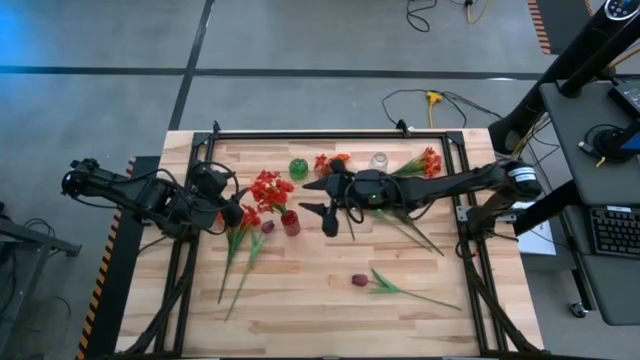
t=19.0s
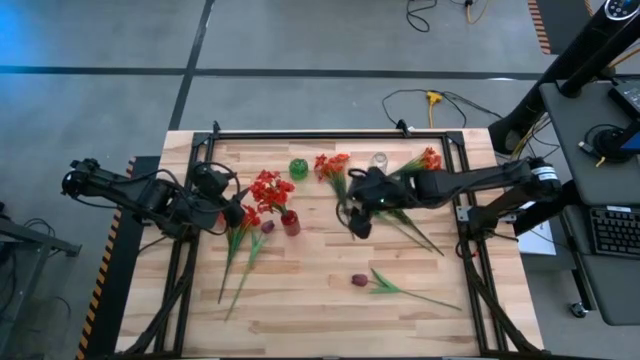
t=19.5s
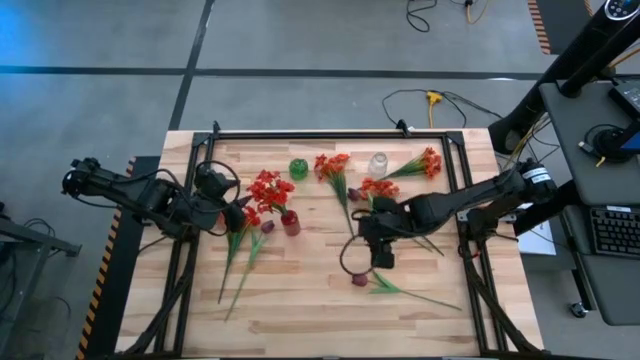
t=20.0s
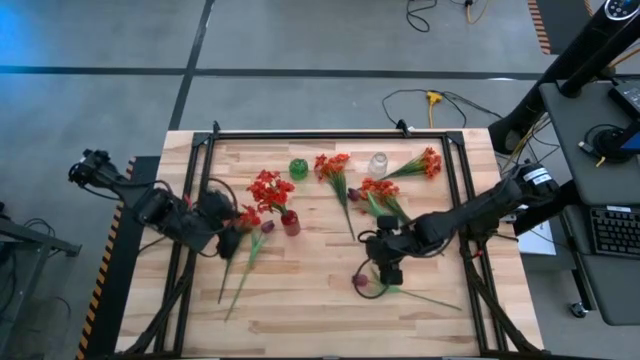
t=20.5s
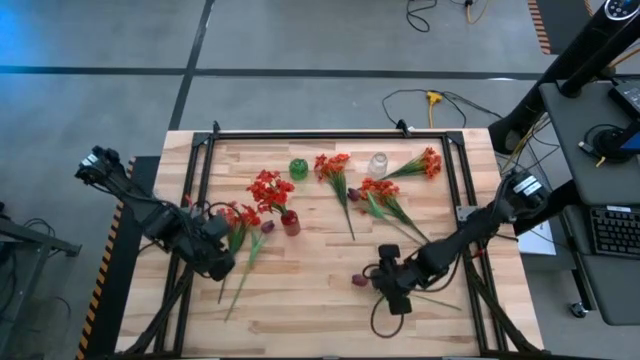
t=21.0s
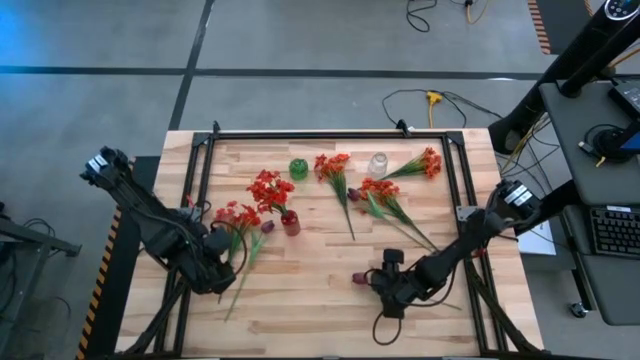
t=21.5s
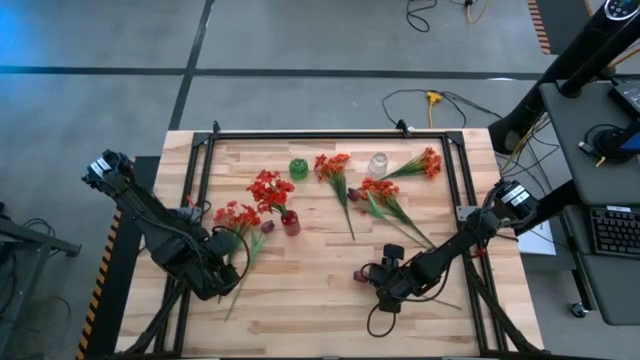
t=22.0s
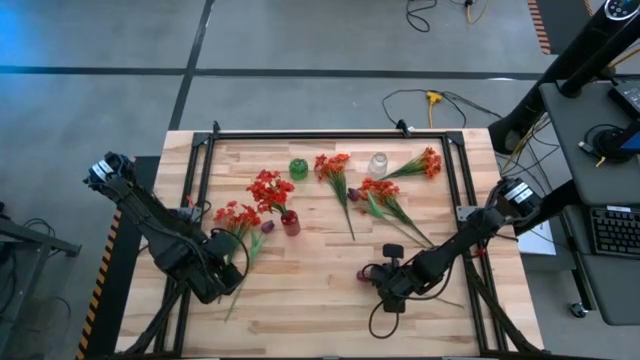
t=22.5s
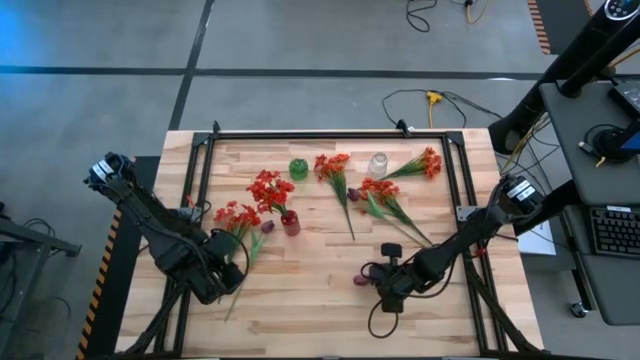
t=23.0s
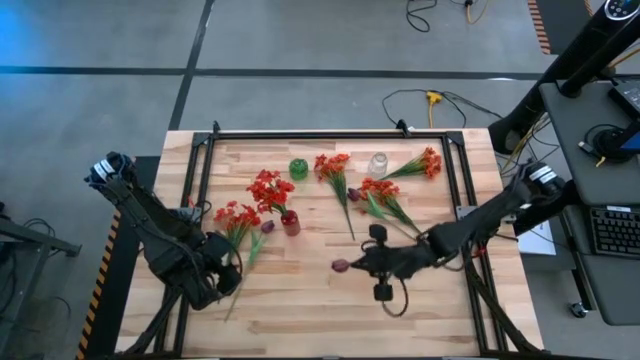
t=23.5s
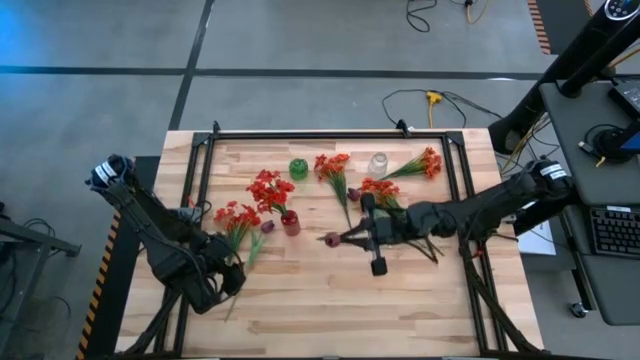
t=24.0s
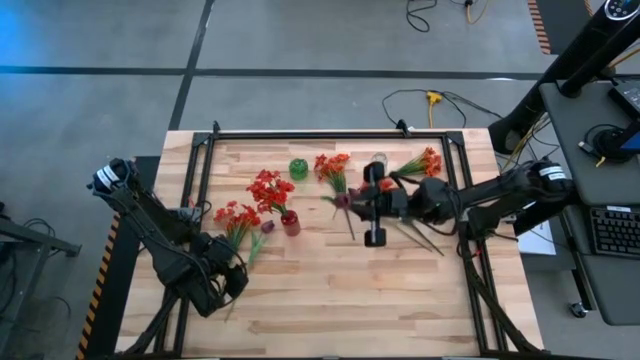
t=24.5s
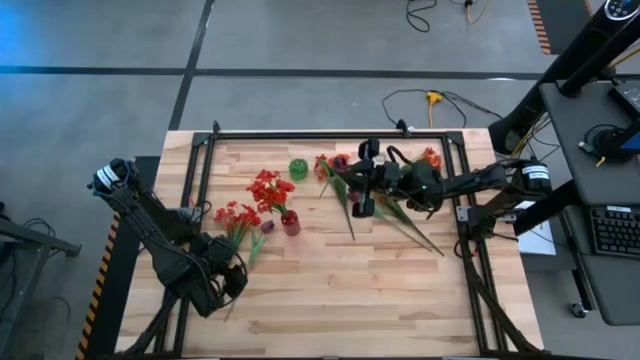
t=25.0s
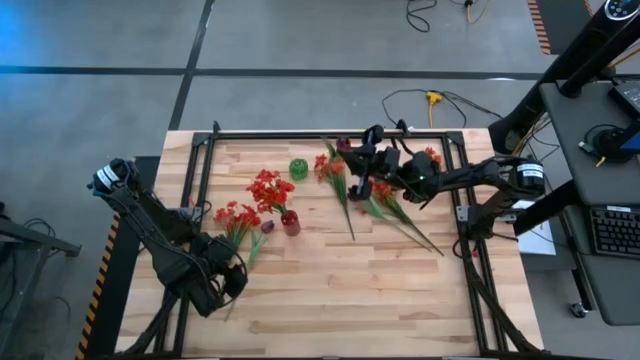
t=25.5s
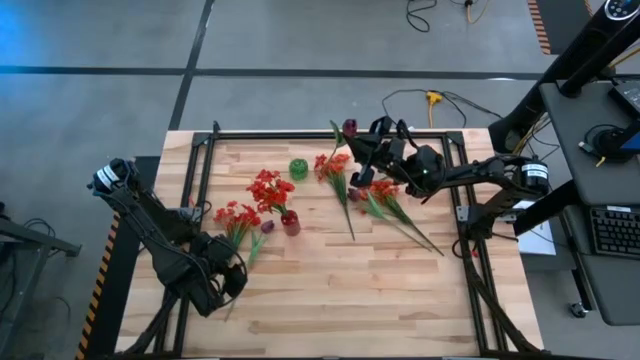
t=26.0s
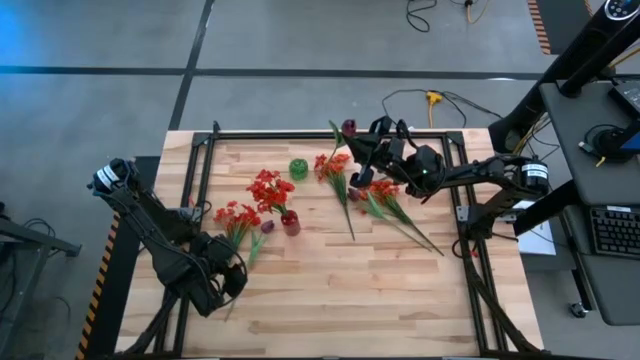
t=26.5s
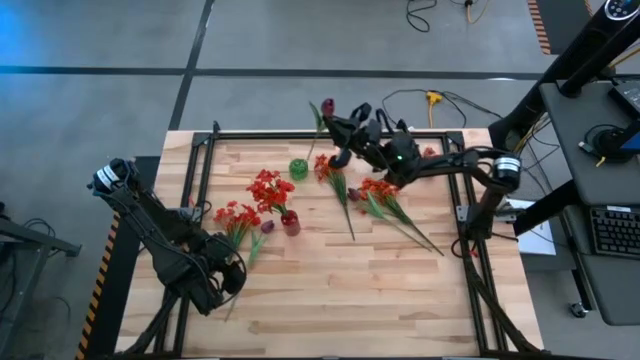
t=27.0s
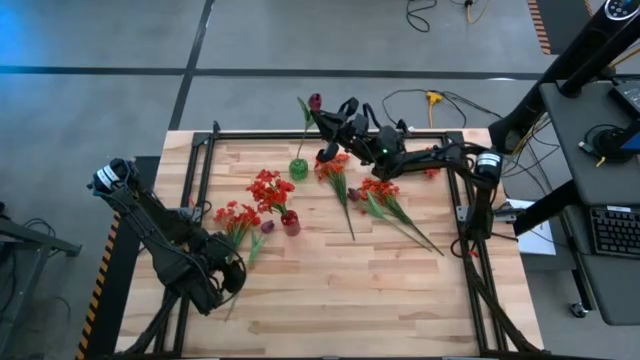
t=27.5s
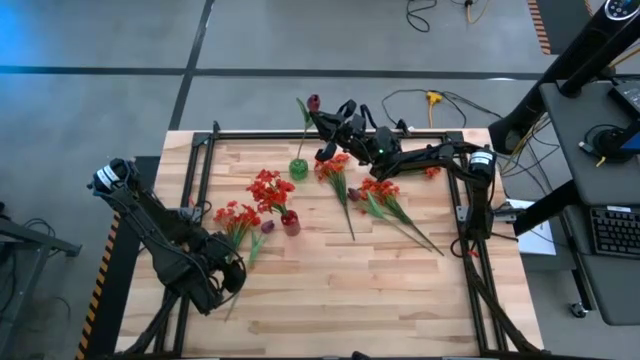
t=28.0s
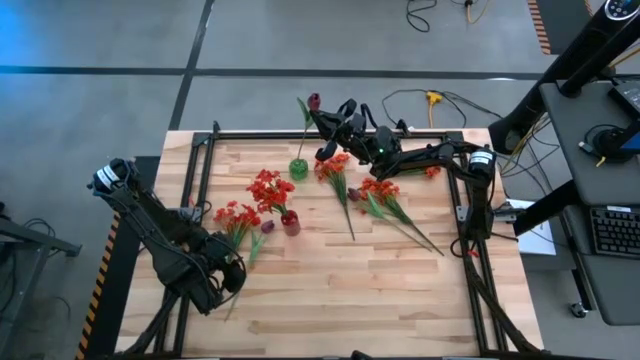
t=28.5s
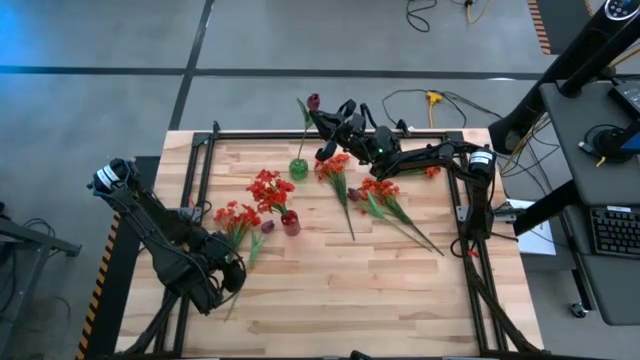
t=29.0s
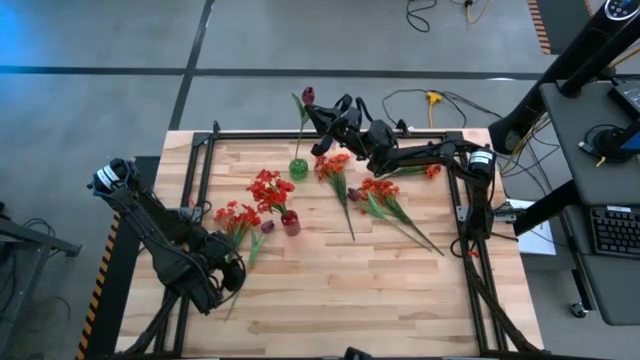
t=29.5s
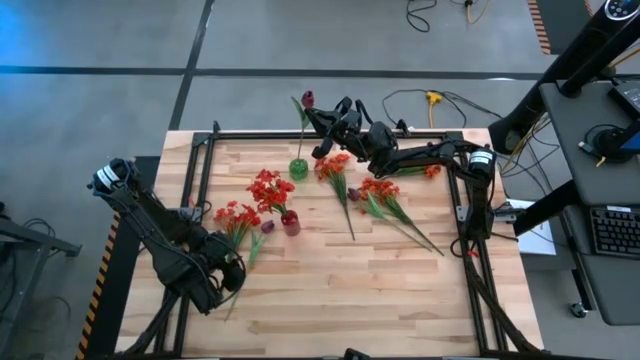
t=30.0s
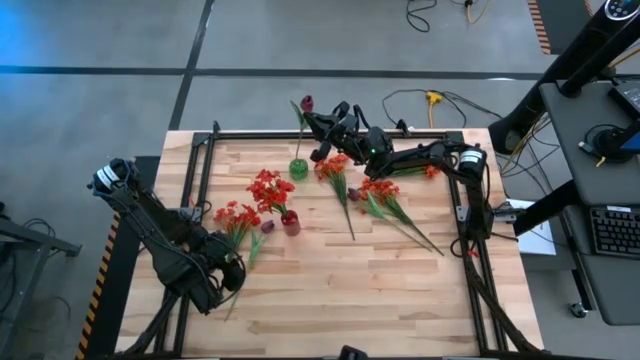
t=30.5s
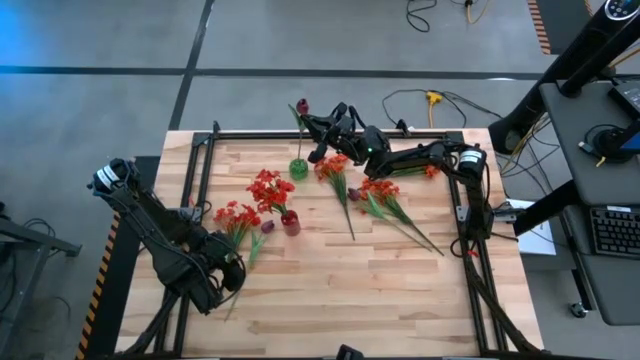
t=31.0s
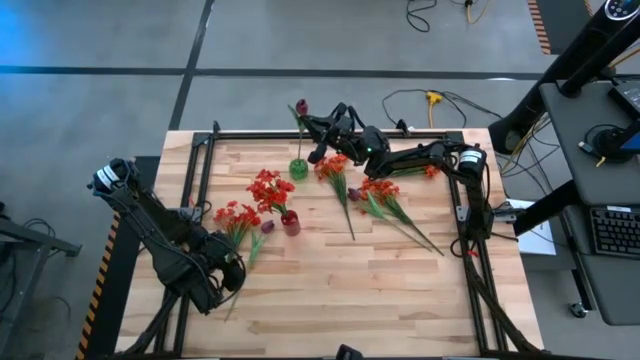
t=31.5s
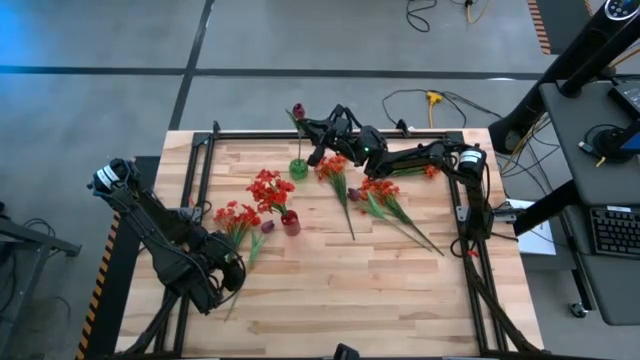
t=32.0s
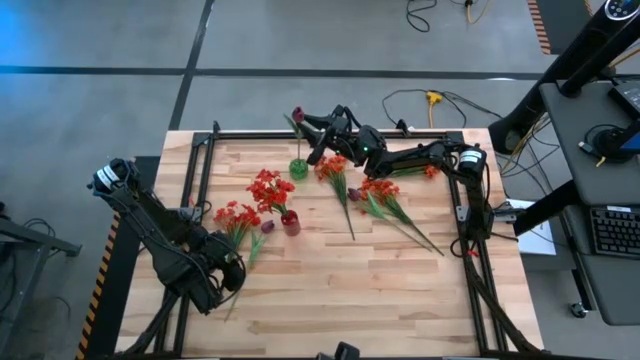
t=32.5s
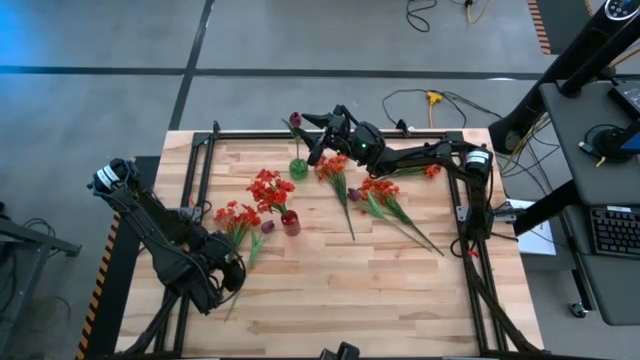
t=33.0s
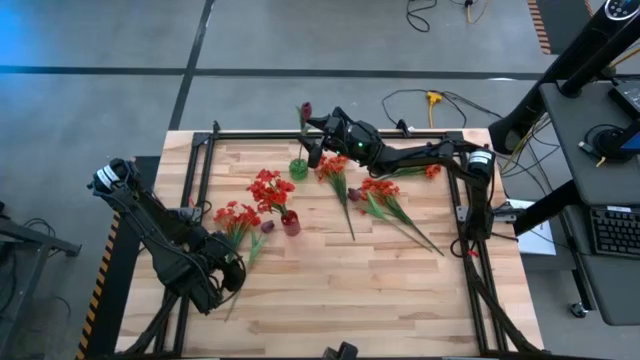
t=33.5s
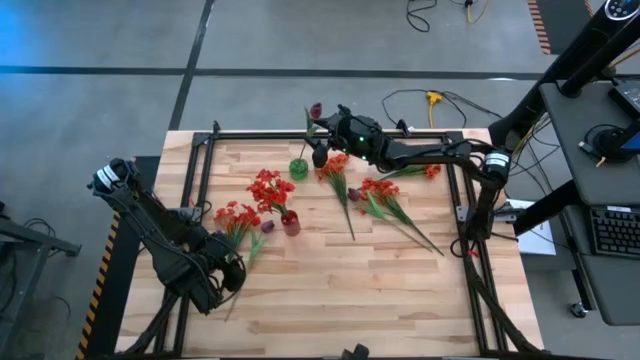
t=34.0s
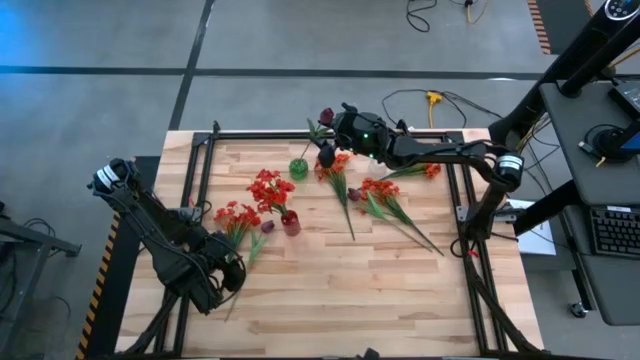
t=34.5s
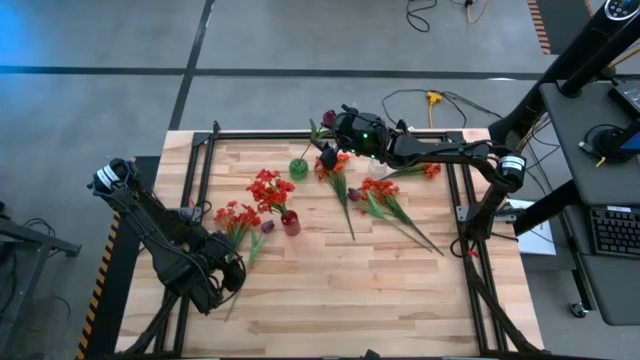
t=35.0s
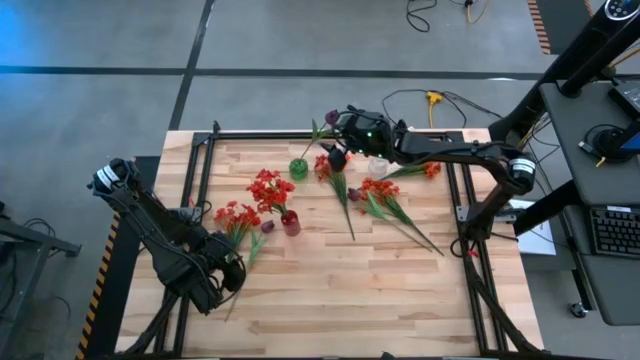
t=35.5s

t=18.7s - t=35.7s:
Task: Sort flowers into vase by color
Put the bottom dark red tulip into the green vase
